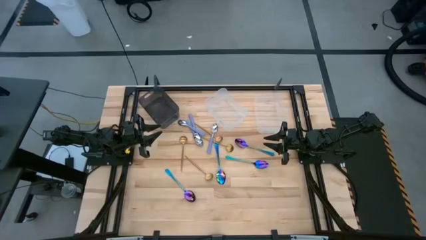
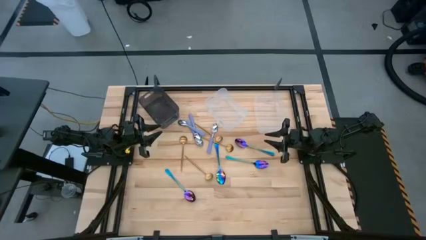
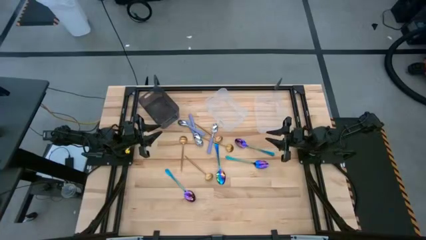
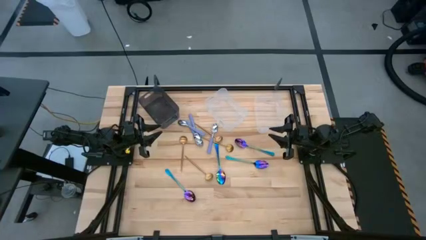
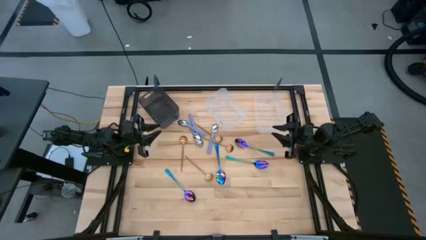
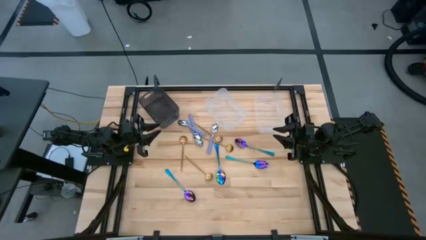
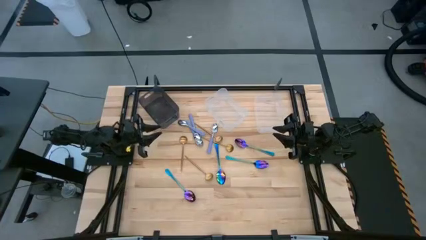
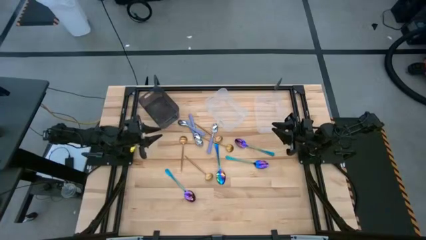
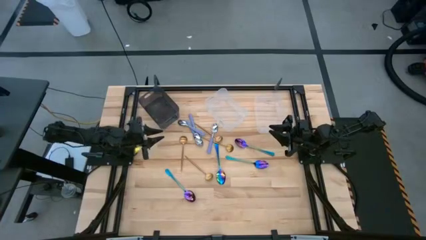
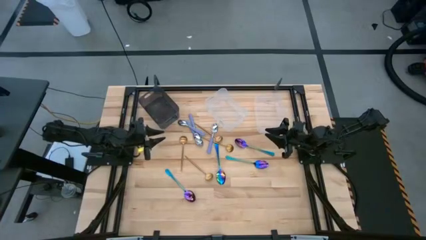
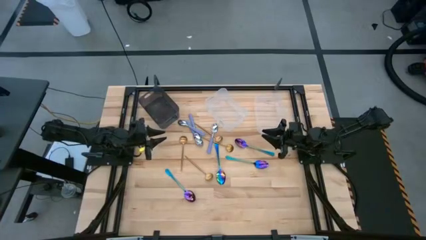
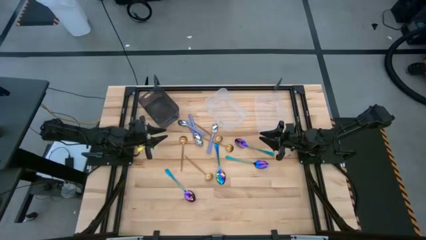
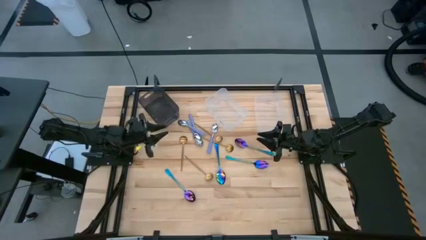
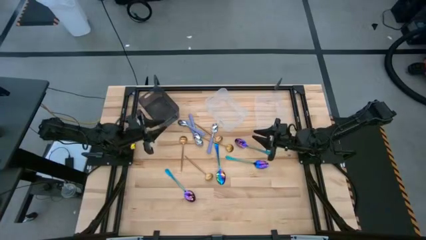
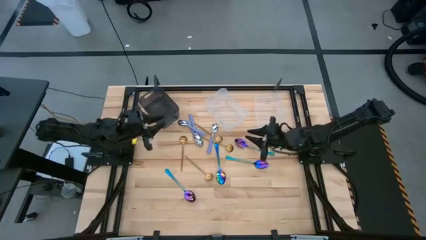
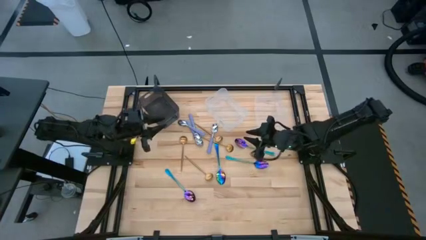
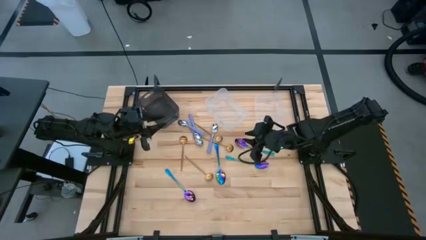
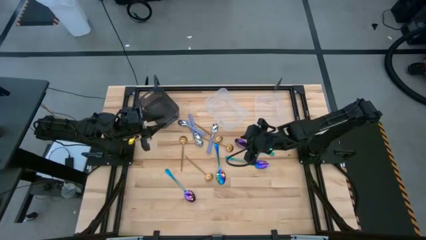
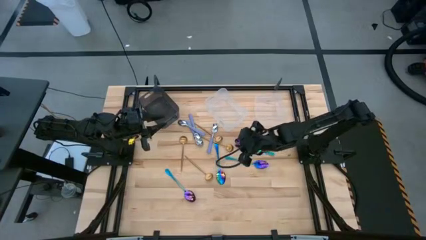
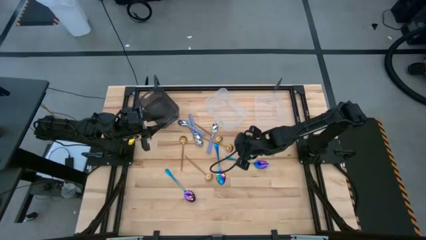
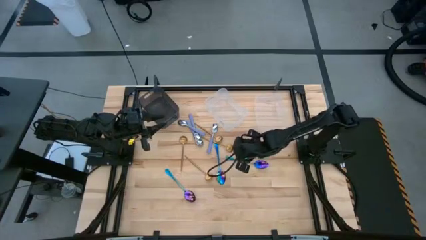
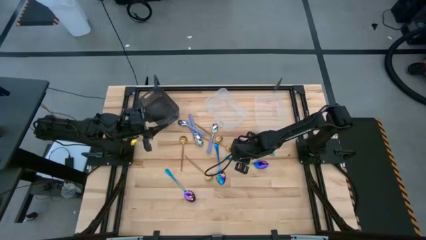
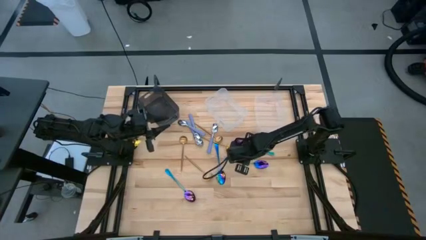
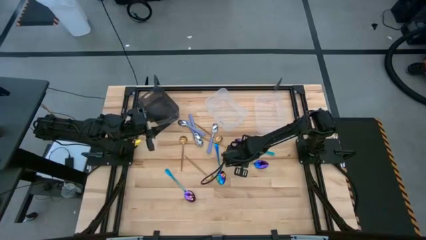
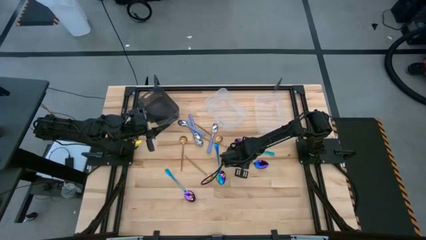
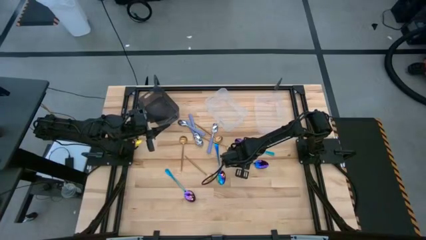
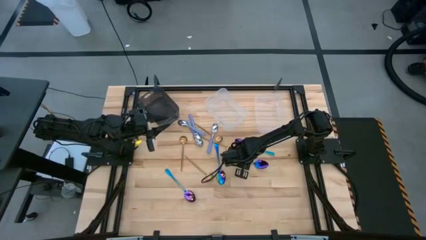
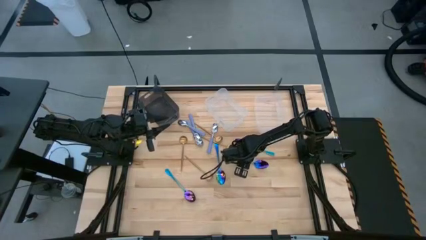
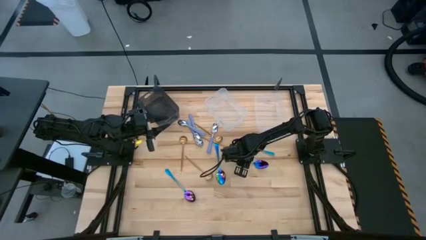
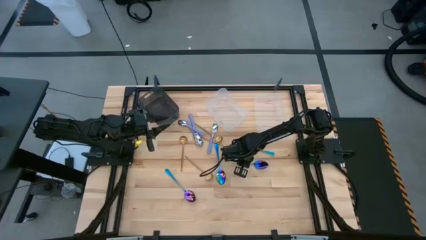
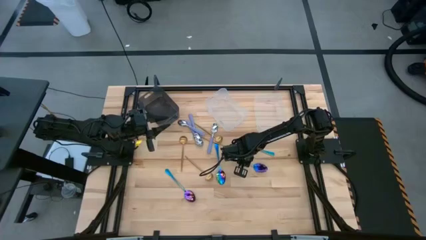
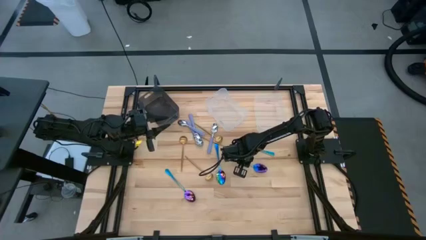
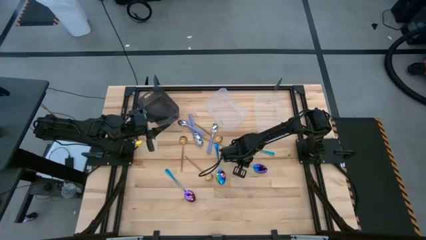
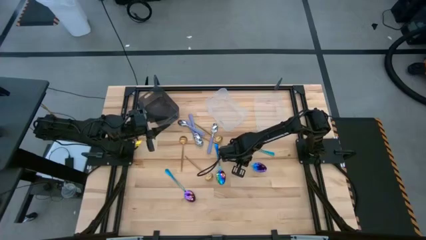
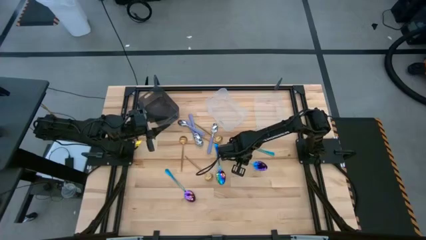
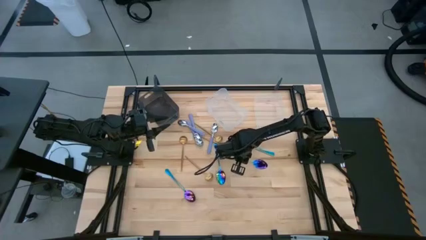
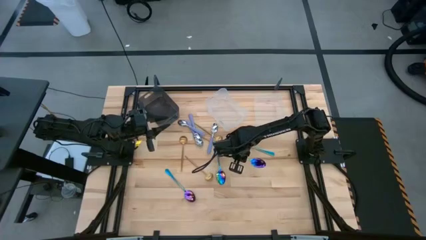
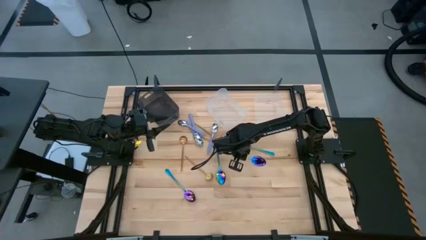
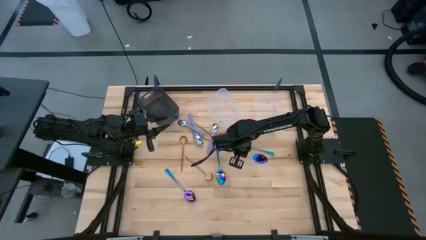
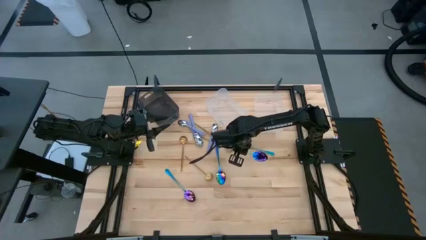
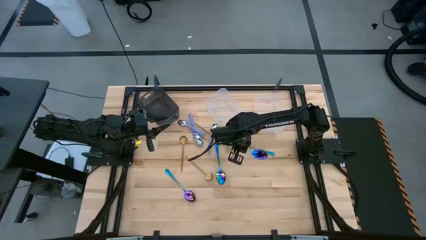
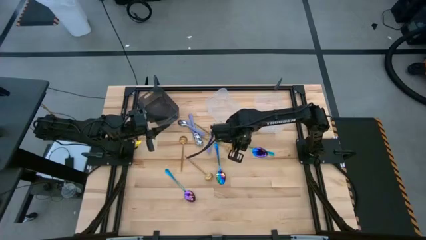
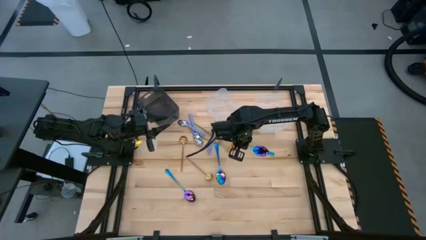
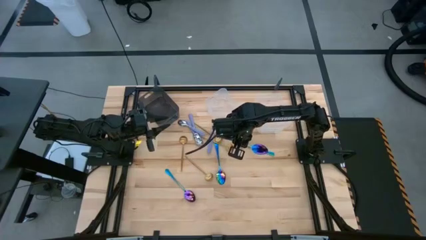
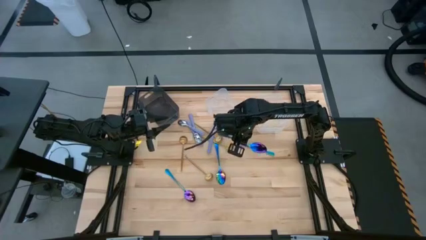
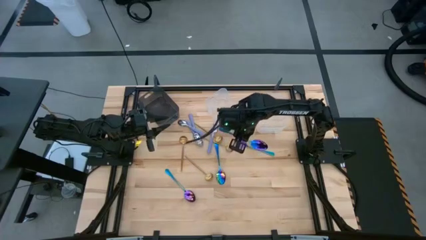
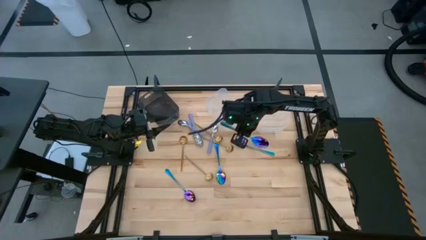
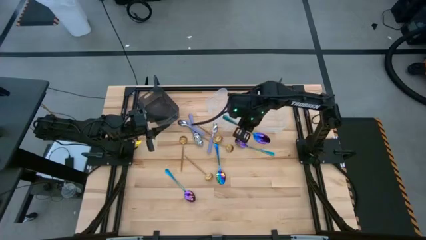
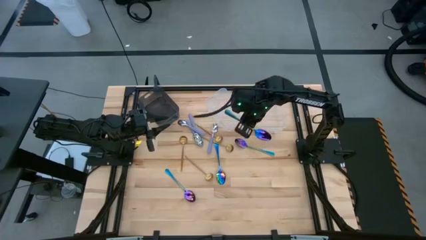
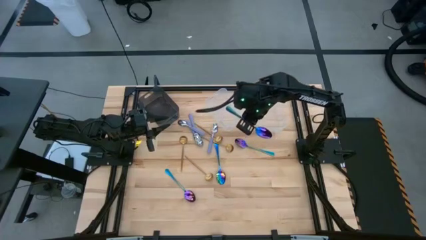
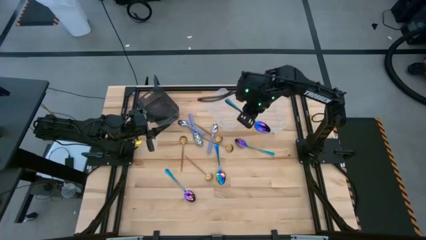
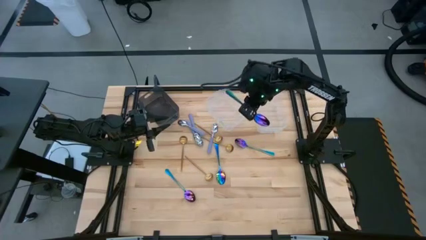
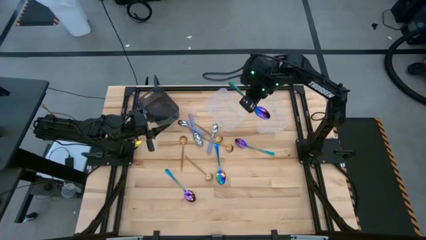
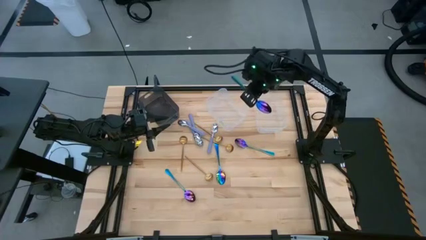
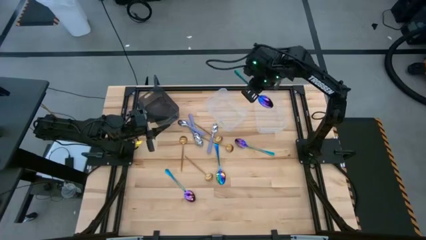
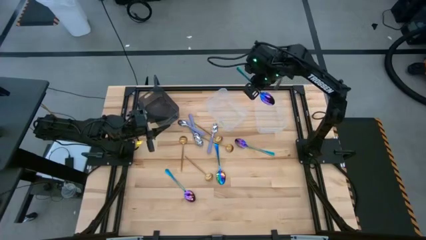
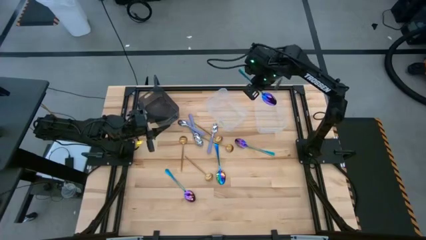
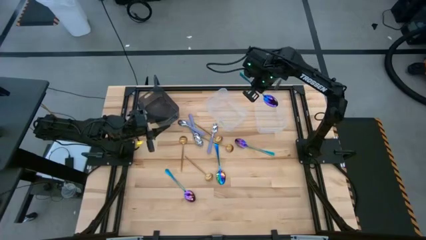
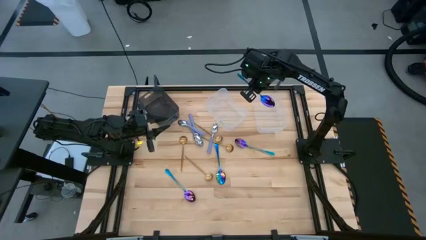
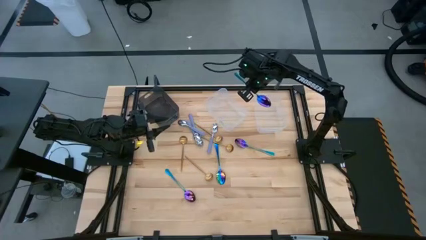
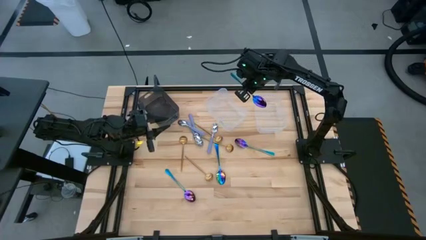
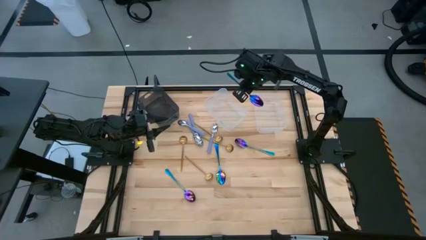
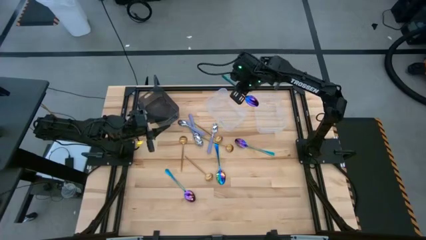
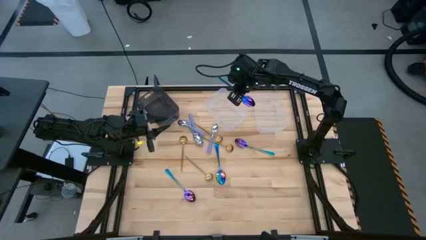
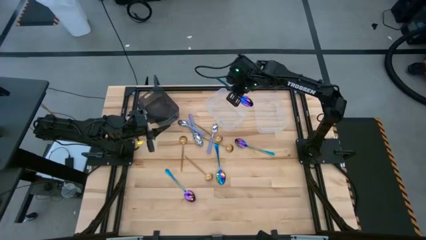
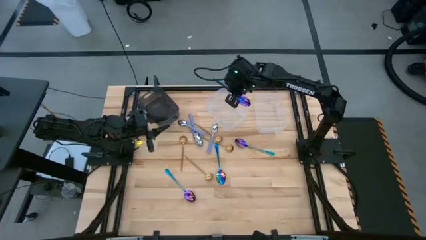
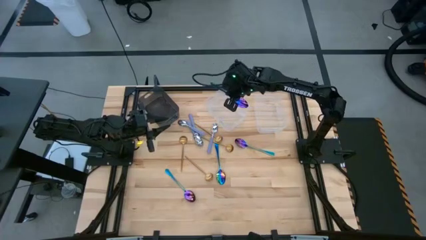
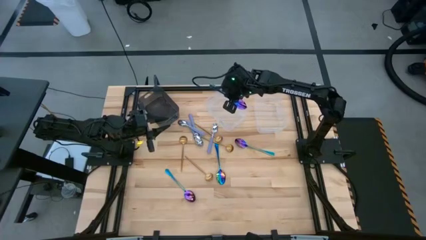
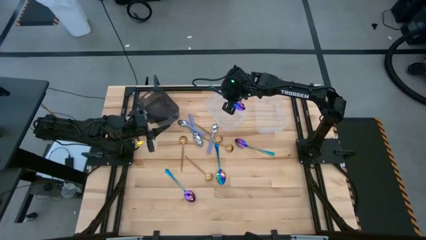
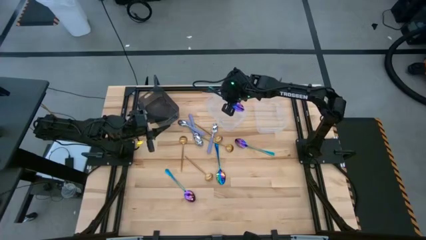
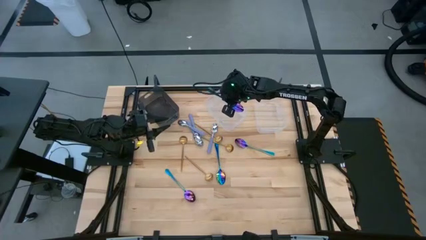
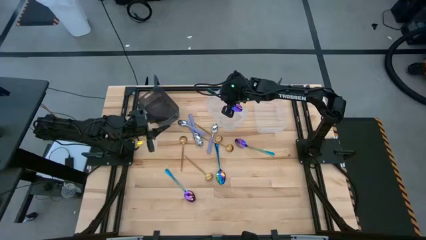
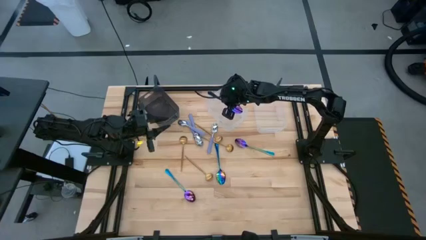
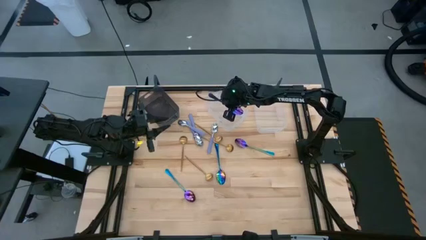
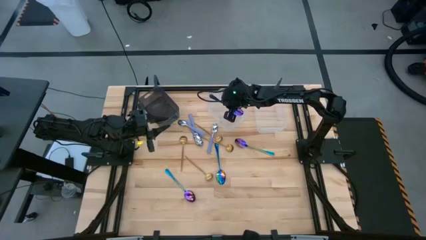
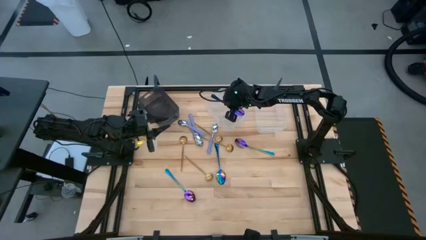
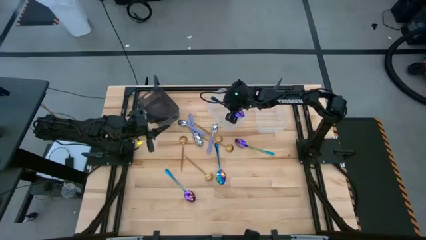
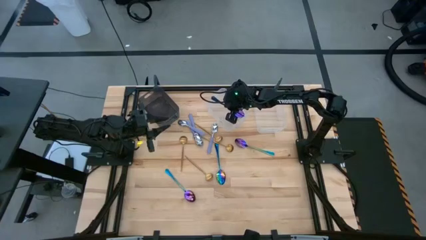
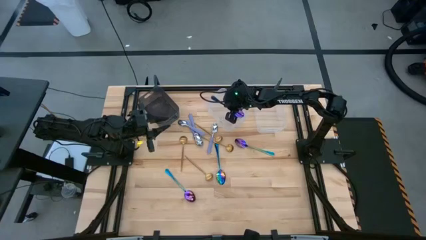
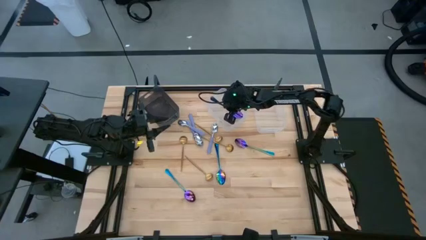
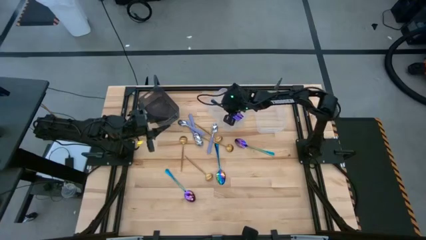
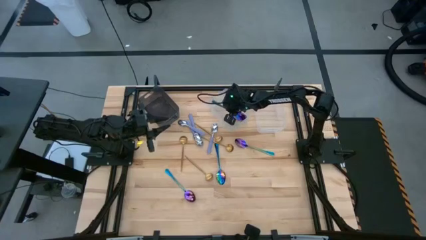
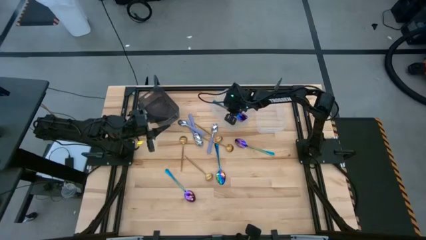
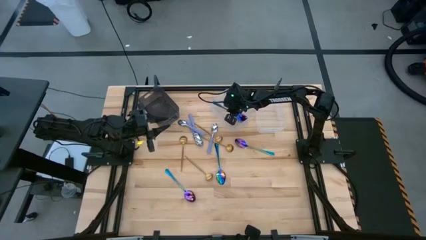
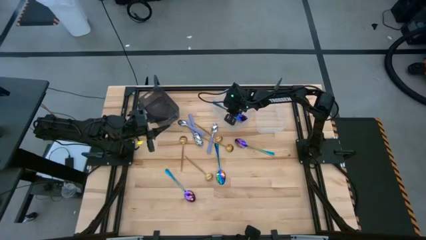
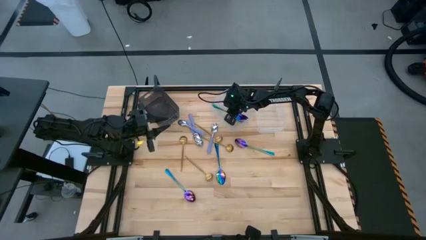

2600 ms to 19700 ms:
Task: Sort silverware by color (type)
Put the blue spoon into the left transparent bin
